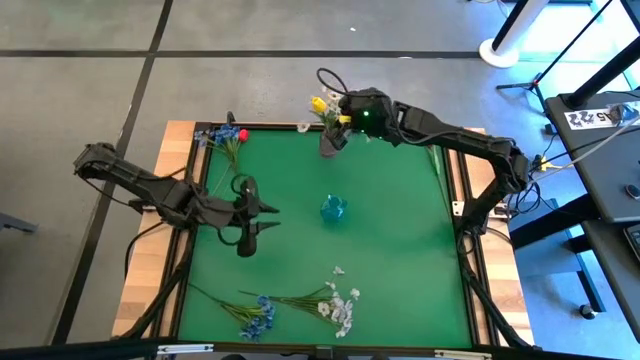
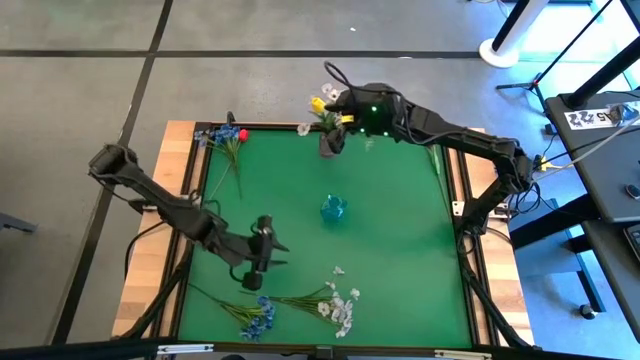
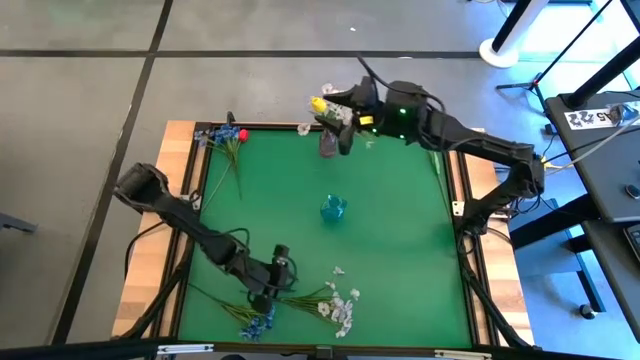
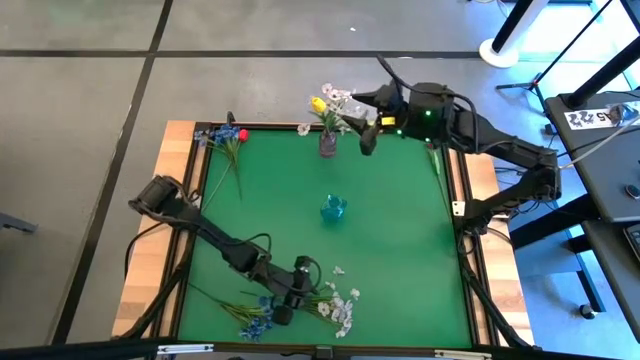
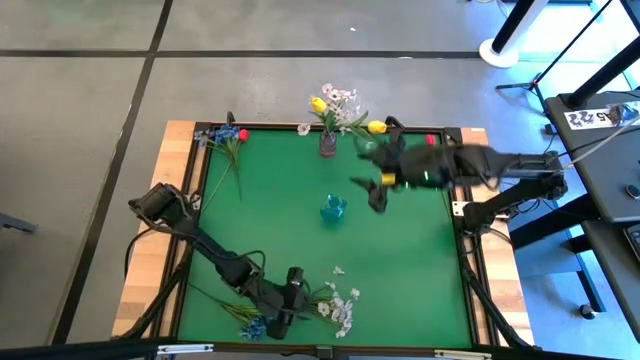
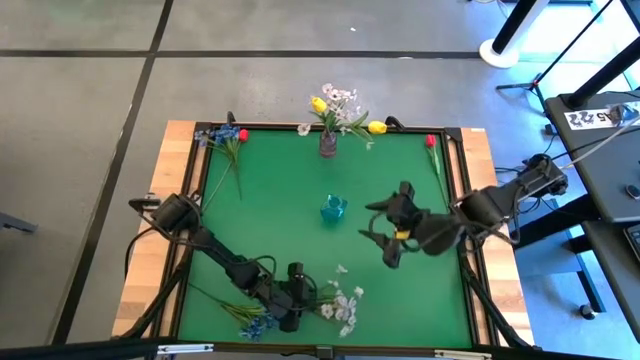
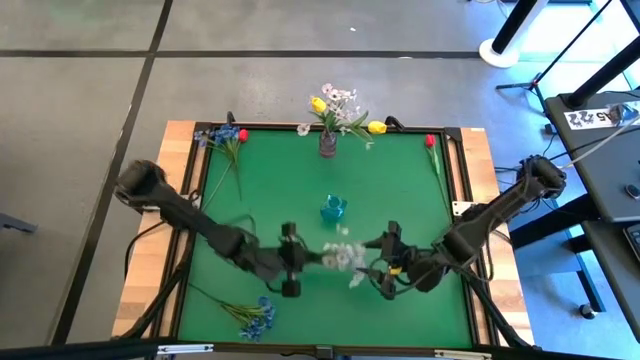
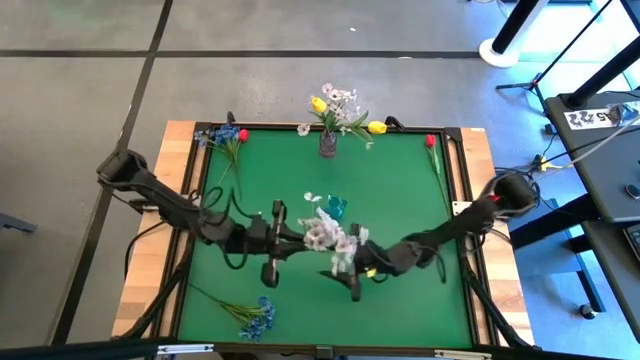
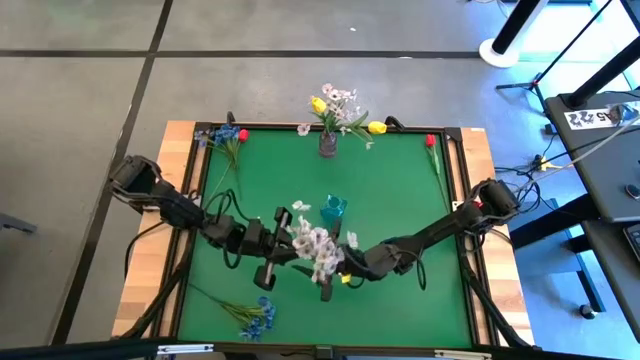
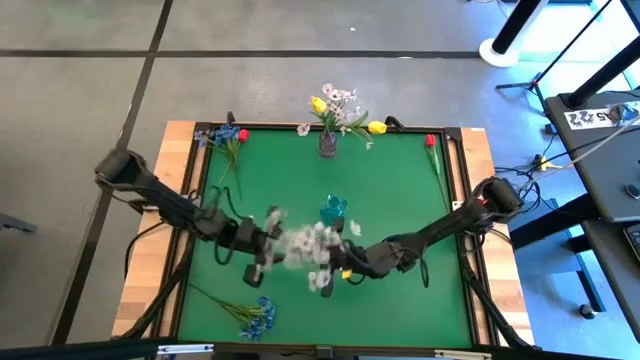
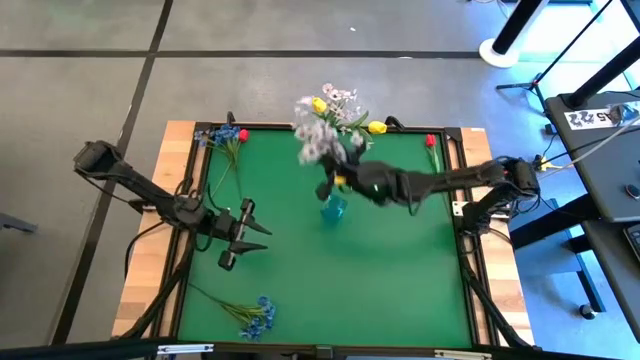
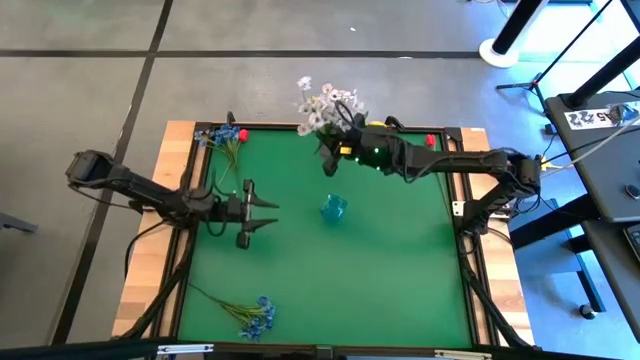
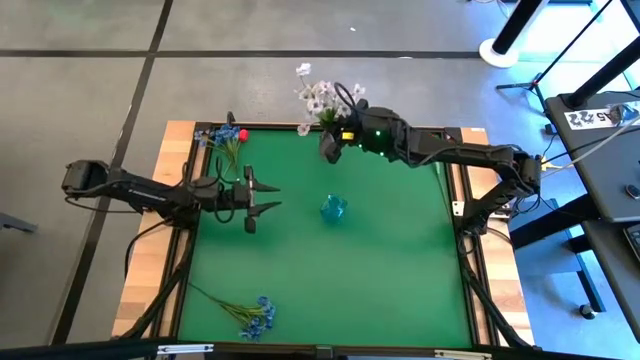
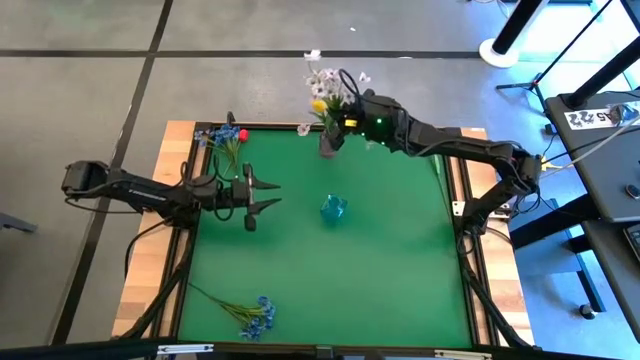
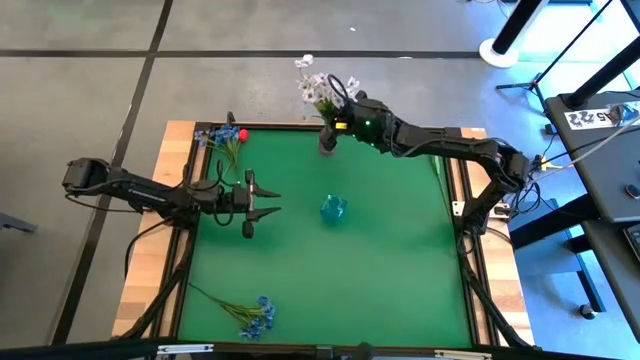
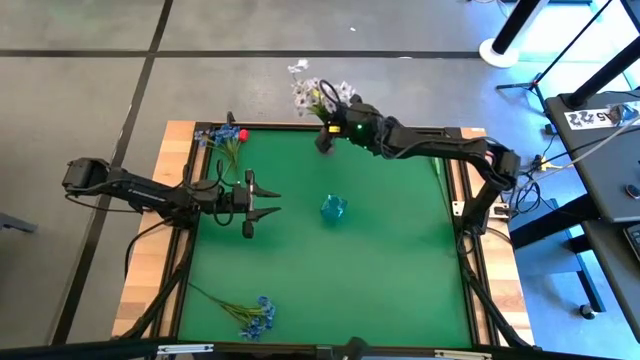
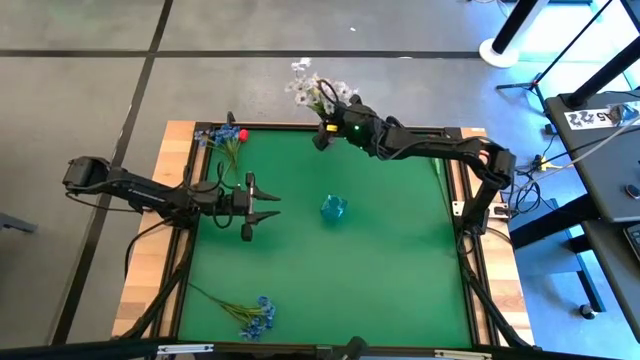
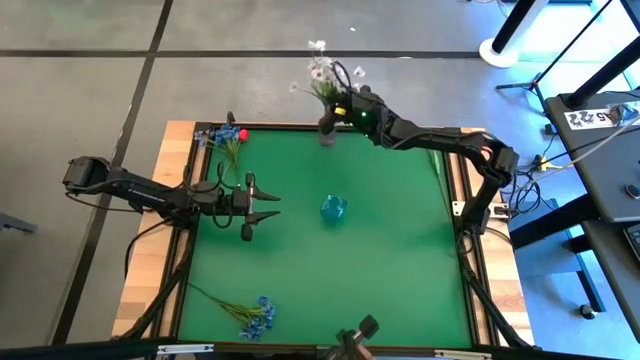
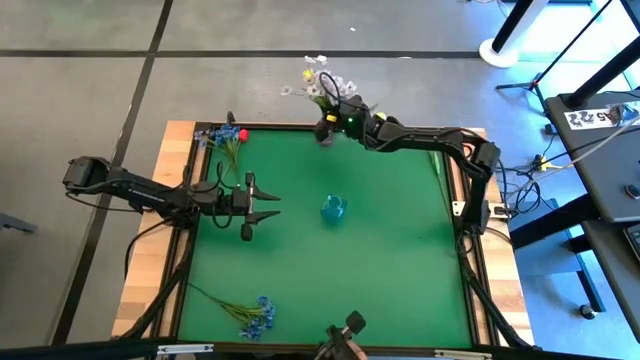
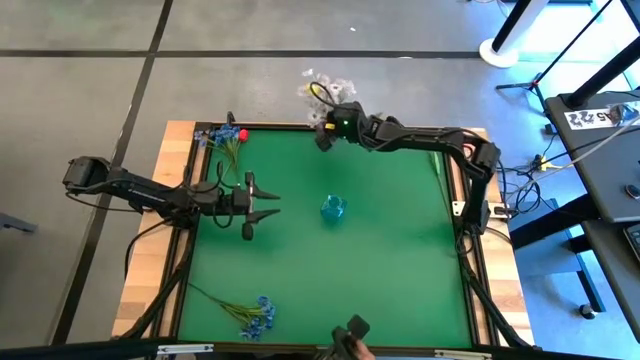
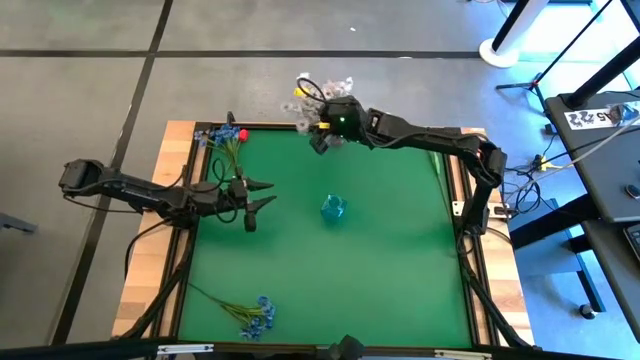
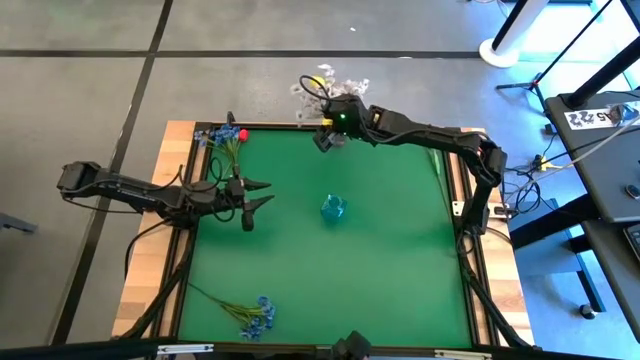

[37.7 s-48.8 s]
Task: Sort flowers into vase by color
Put the white flower into the violet vase

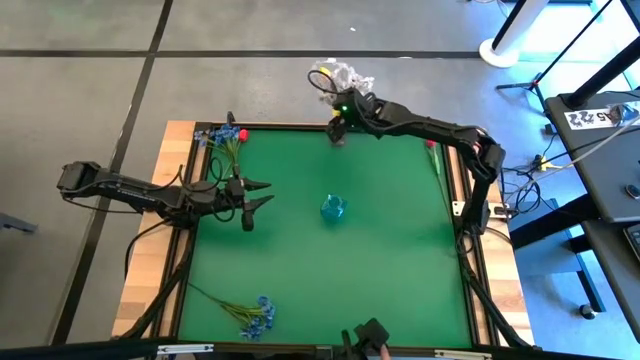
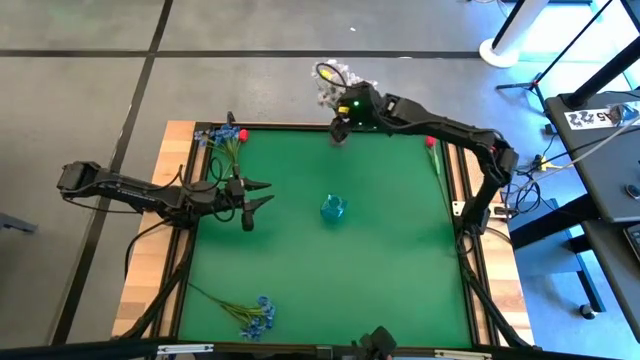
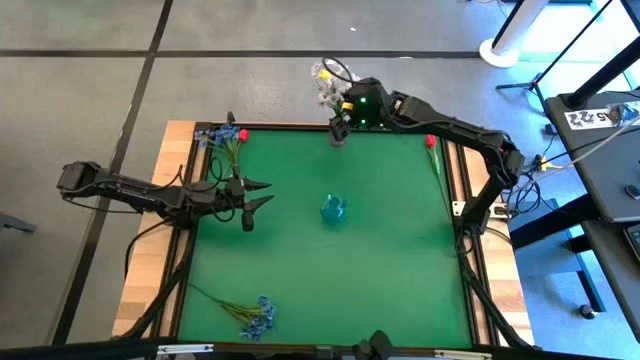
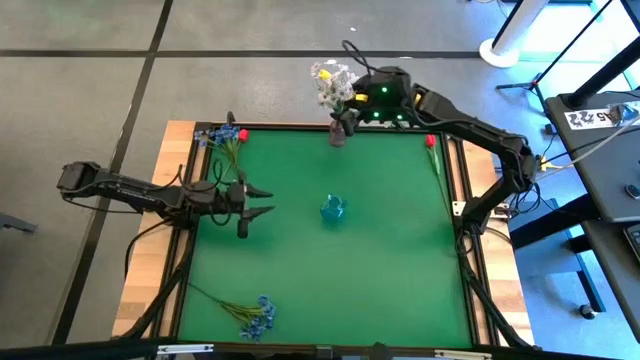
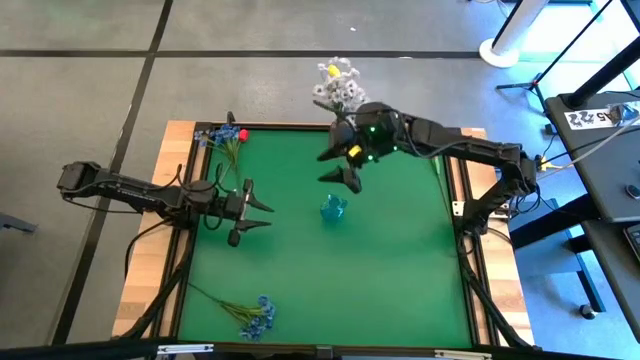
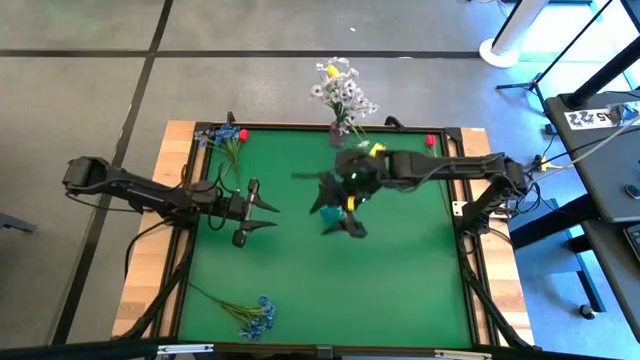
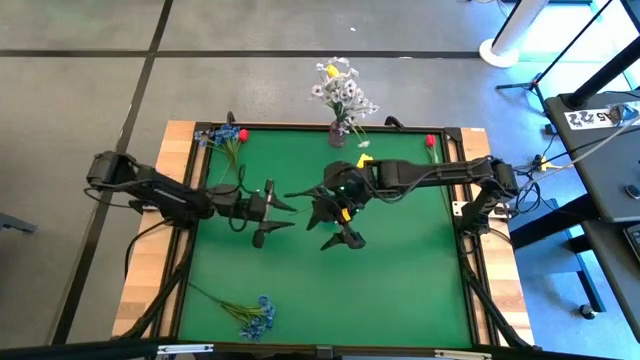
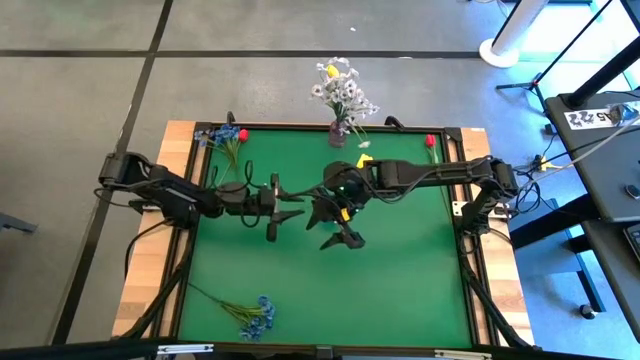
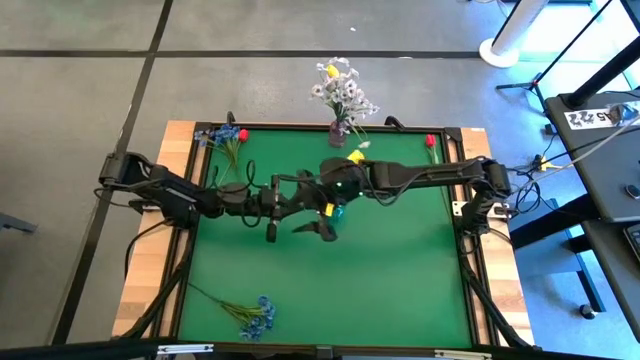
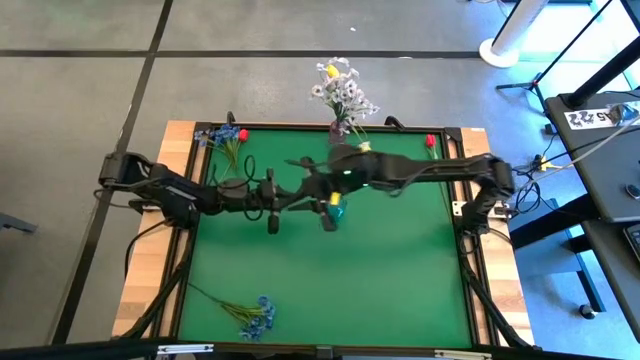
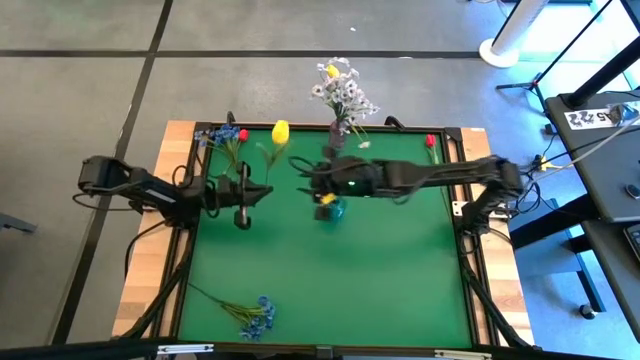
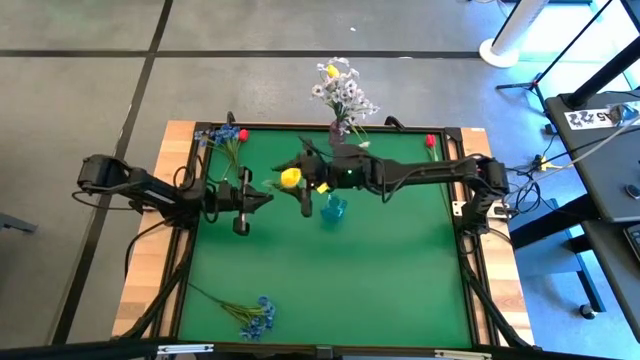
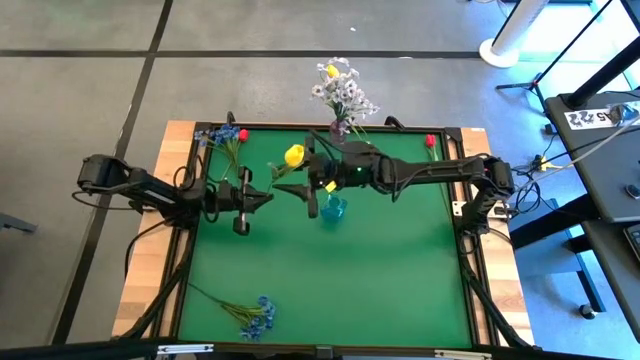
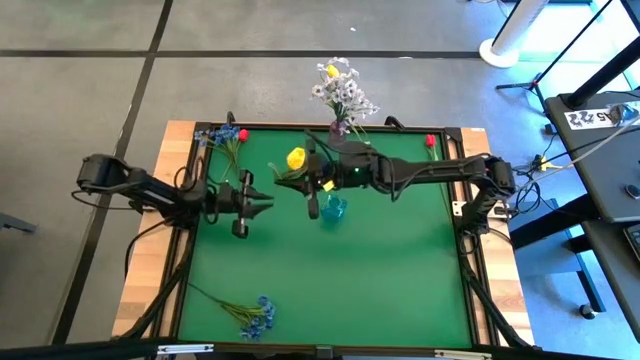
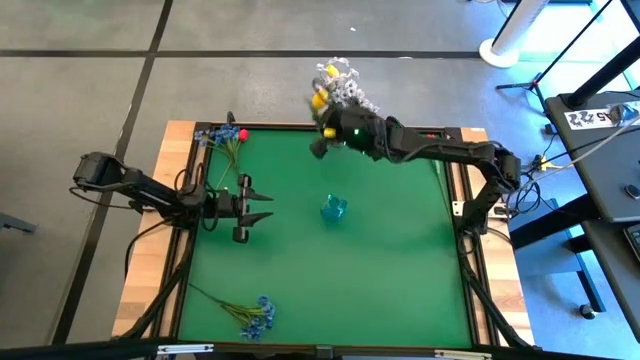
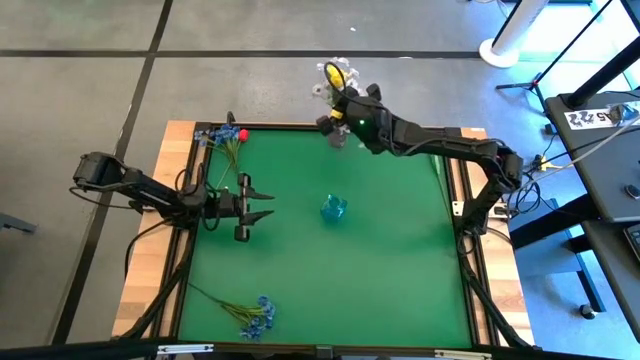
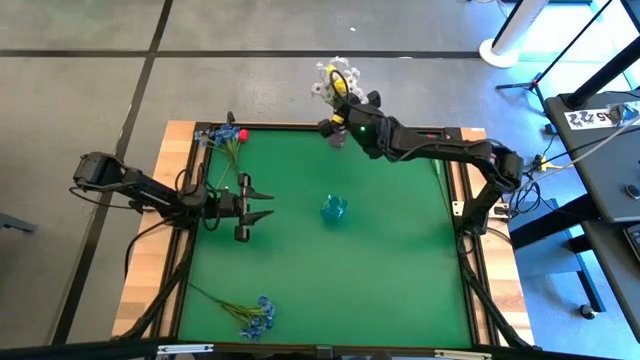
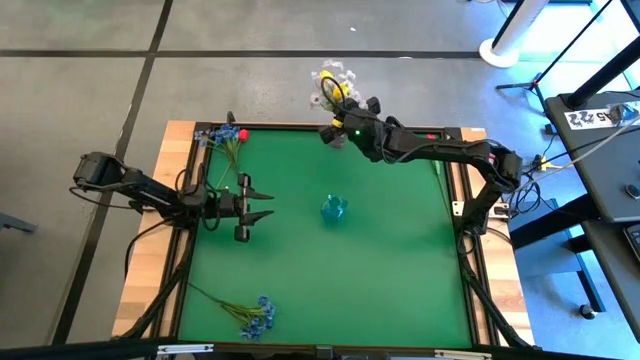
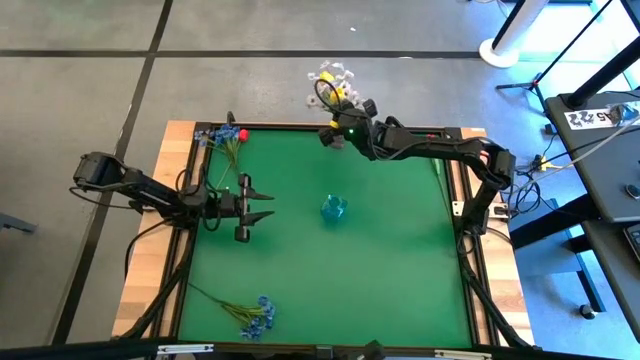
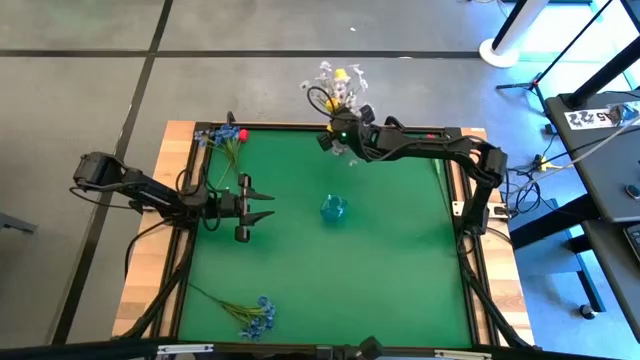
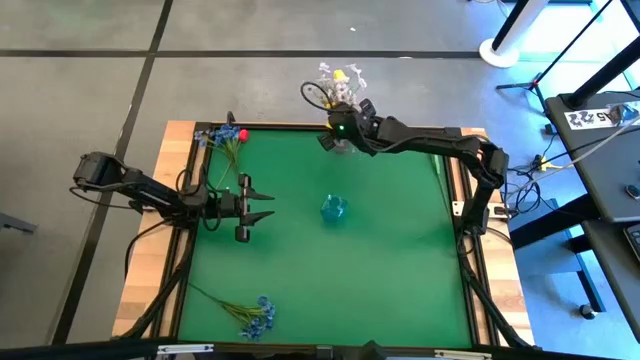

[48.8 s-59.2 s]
Put the yellow tulip into the violet vase

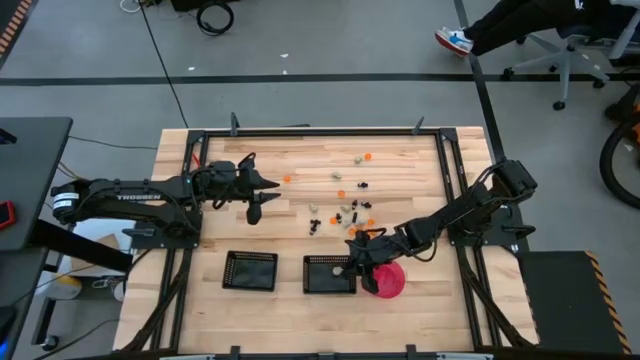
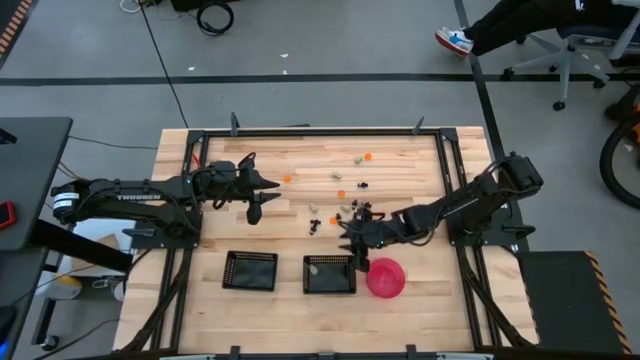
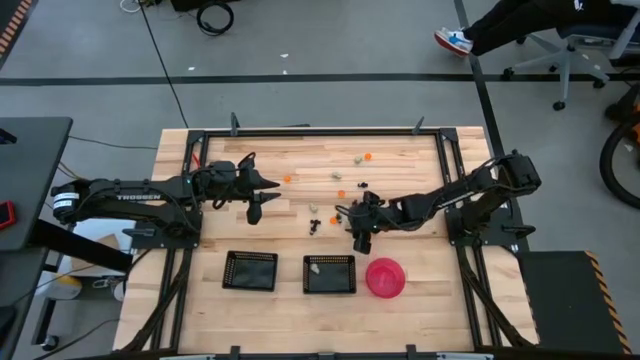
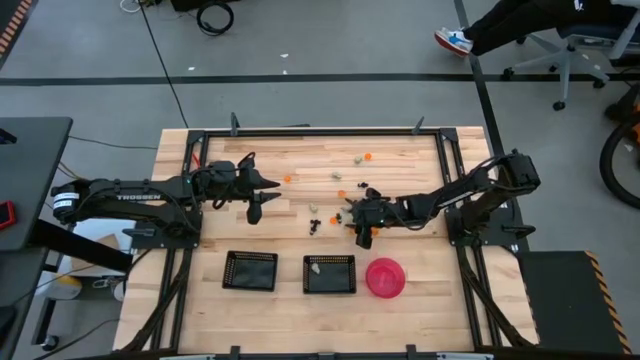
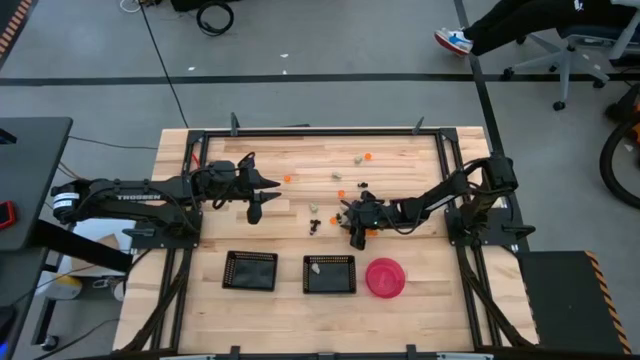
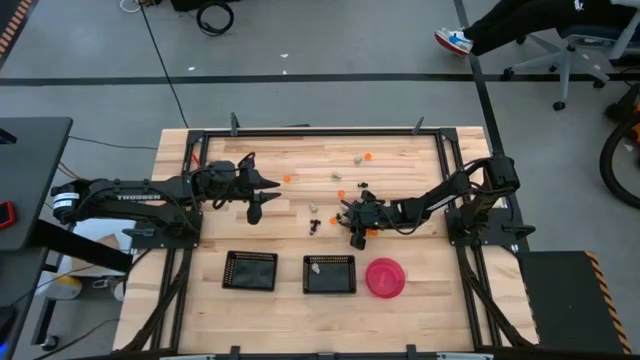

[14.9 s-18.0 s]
Task: Sort Halloween decoration
Put the white skull toy into the right black bin
